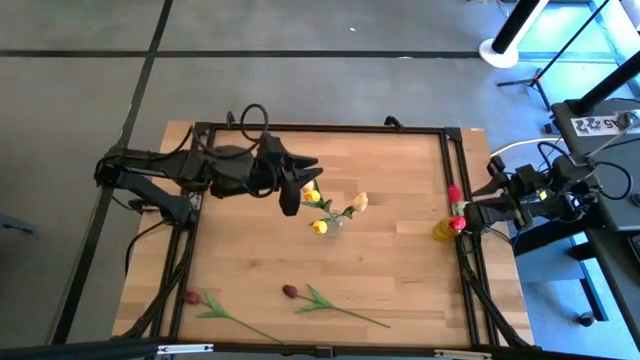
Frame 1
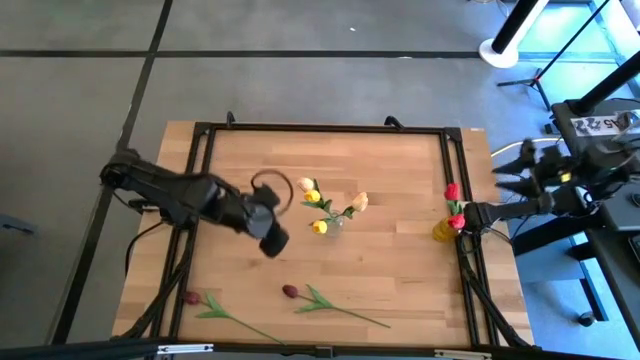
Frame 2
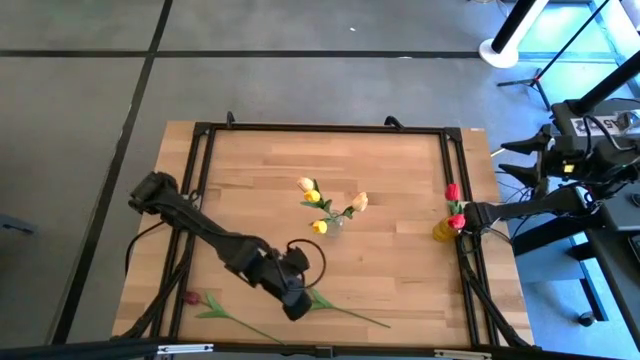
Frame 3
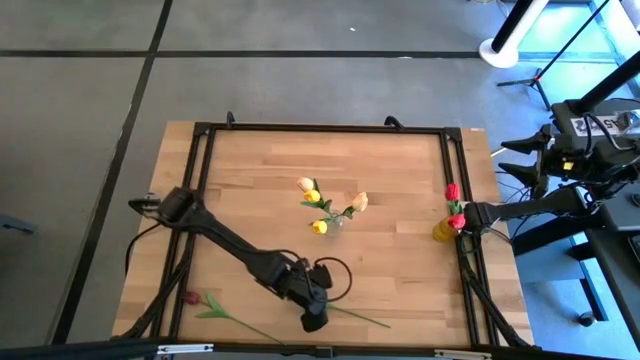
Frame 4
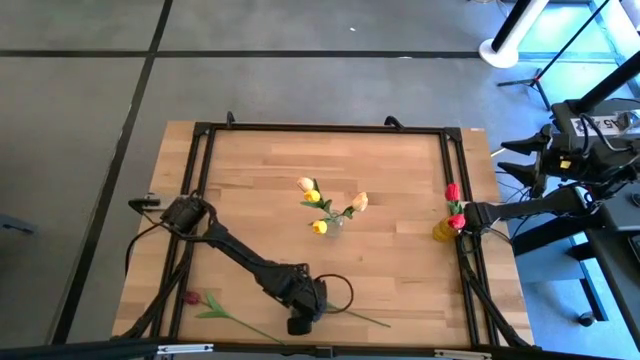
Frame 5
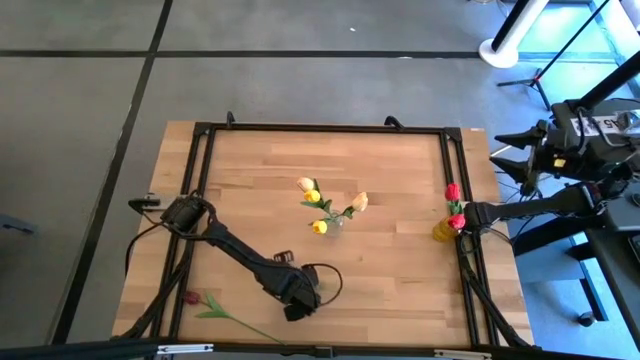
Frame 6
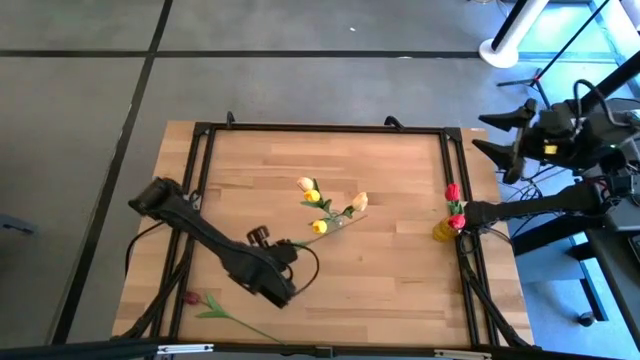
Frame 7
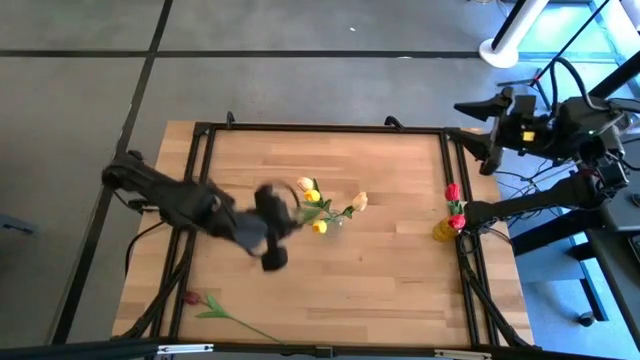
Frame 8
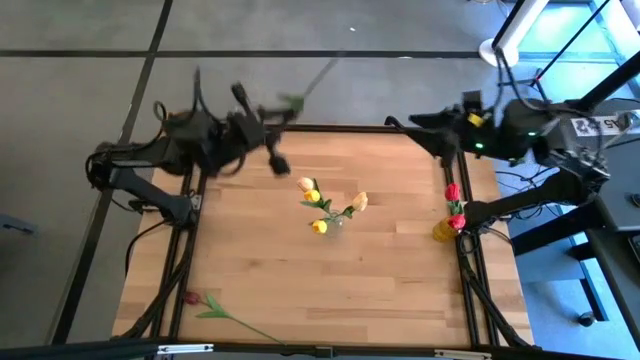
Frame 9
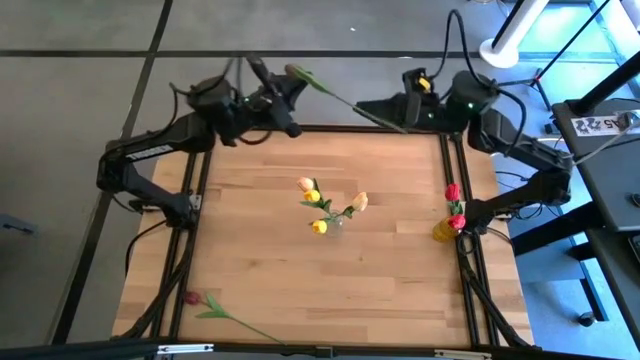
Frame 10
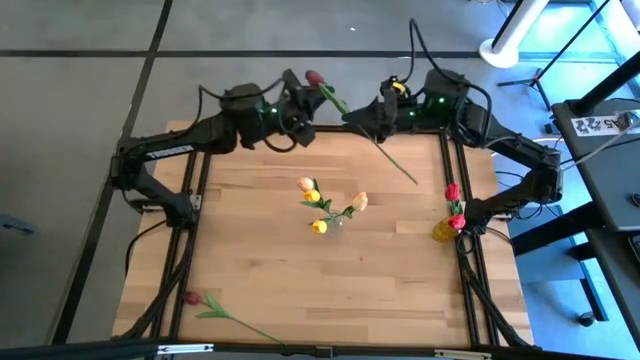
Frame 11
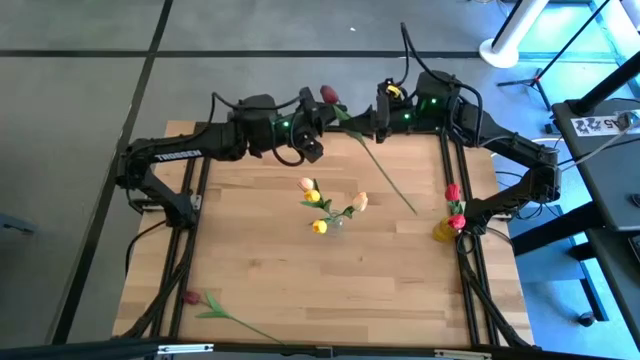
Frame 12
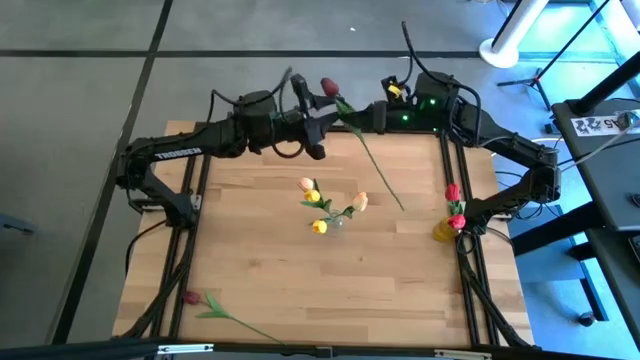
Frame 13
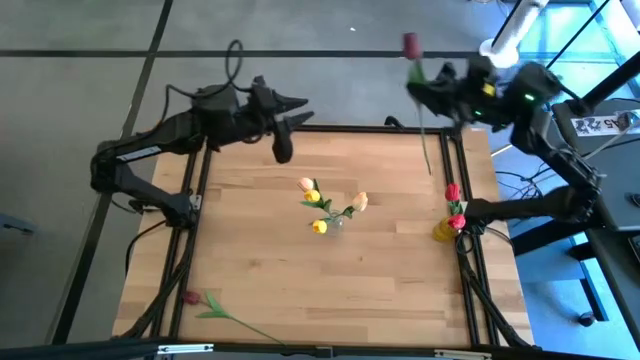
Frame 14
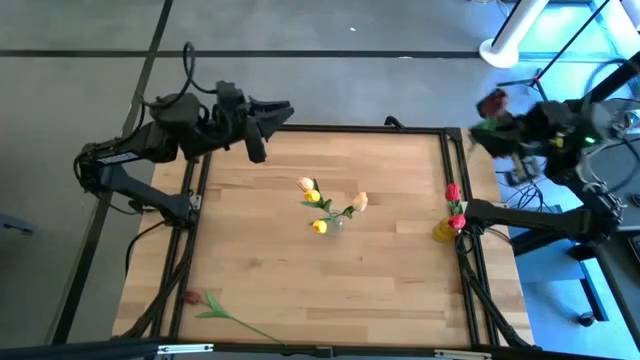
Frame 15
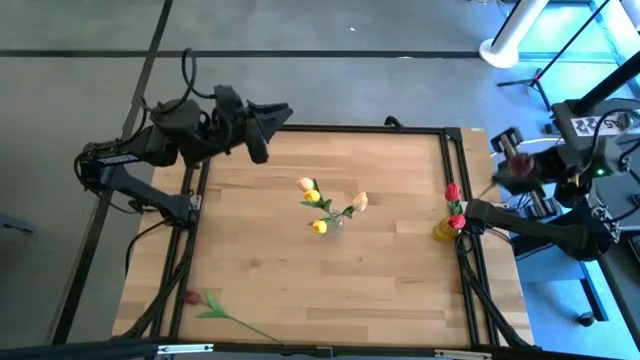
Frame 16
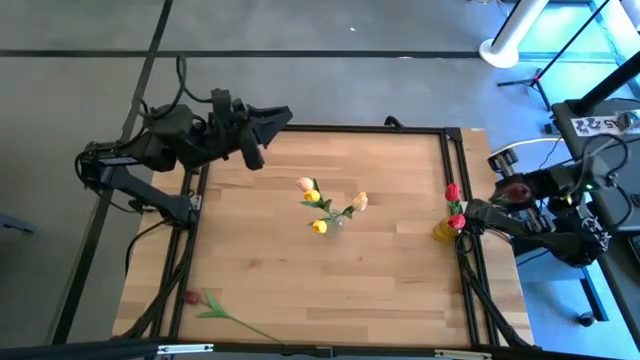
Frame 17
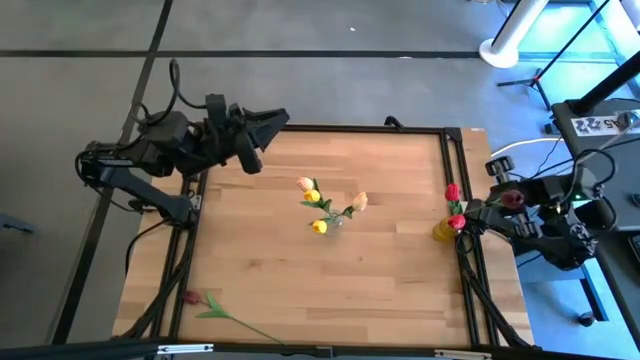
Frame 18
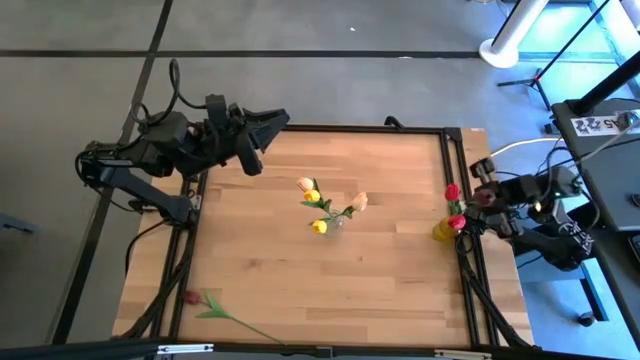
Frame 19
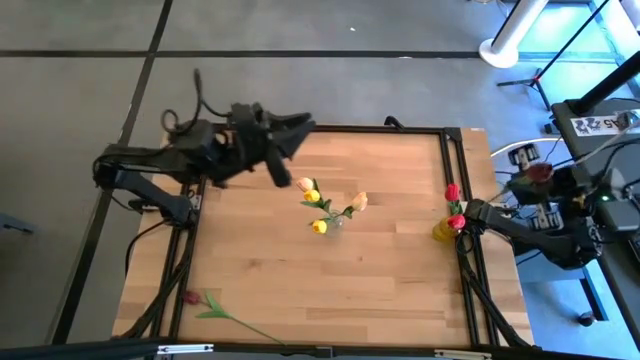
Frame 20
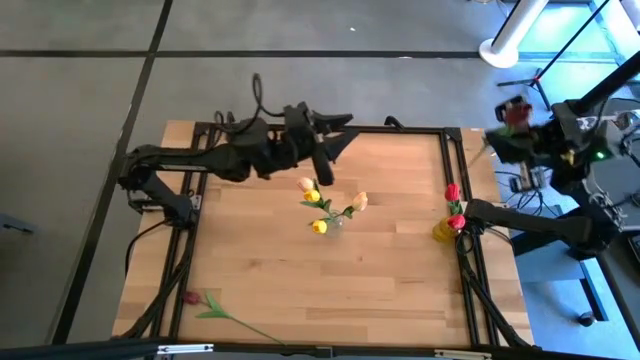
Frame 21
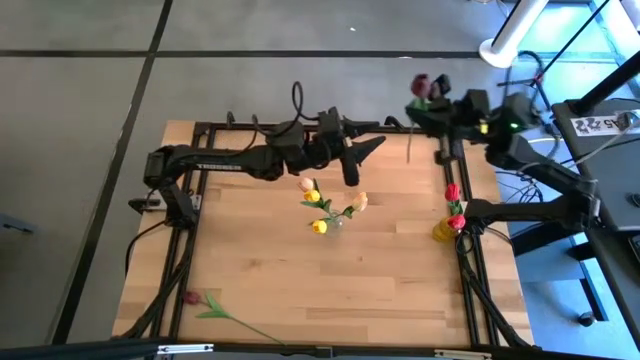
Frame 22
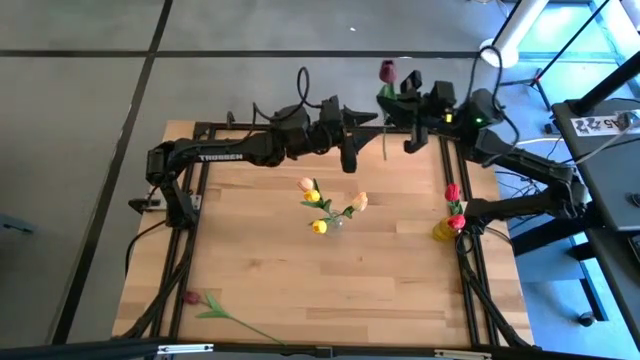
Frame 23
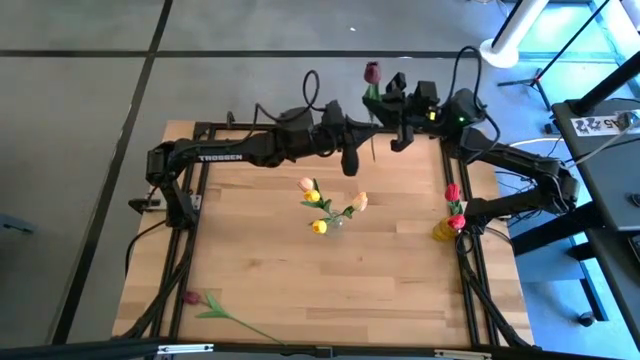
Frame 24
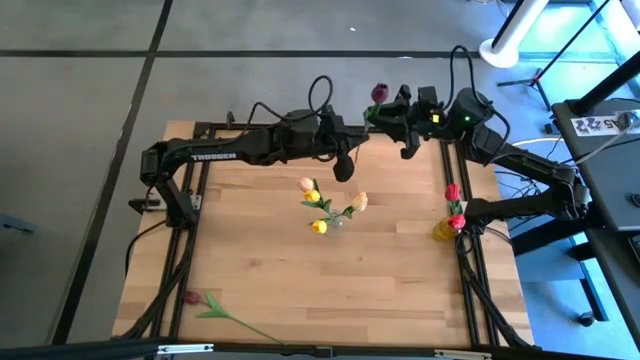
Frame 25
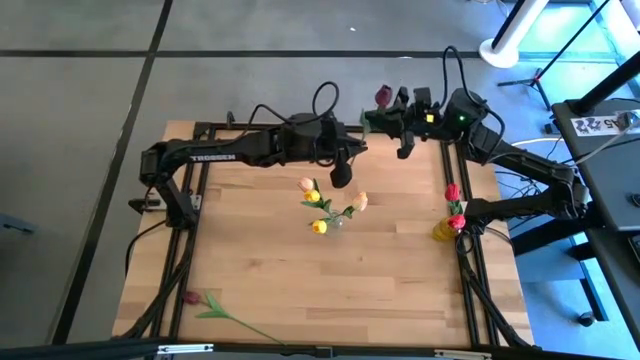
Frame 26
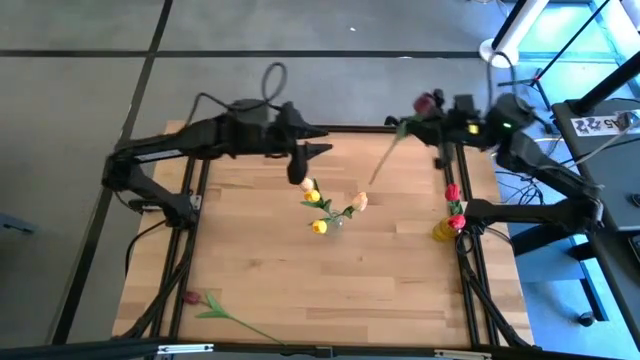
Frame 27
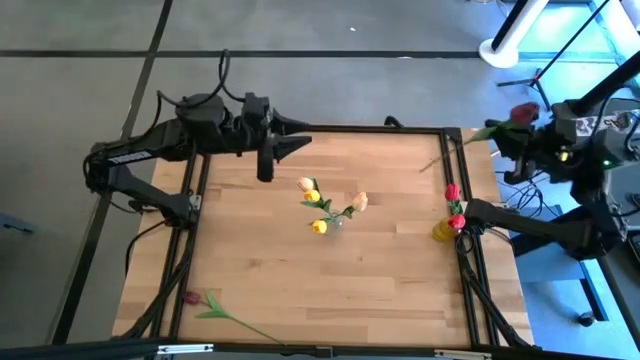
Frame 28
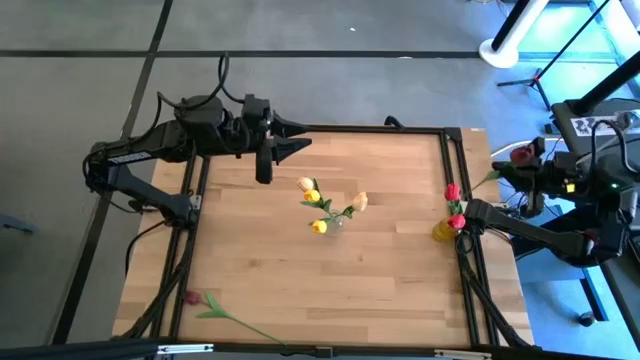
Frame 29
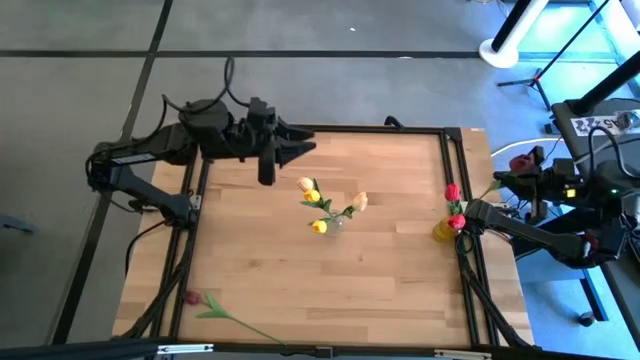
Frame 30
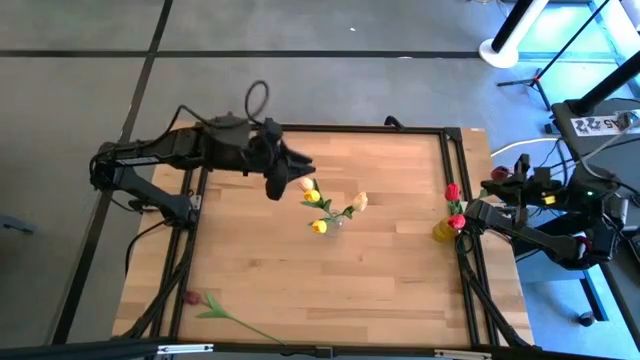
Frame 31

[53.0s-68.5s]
Task: Sort flowers into vase by color
Put the right dark red tulip into the yellow vase

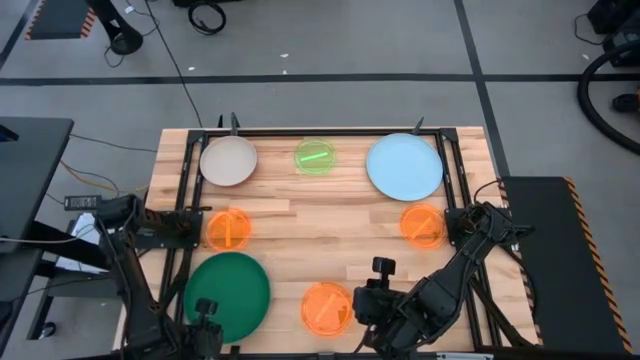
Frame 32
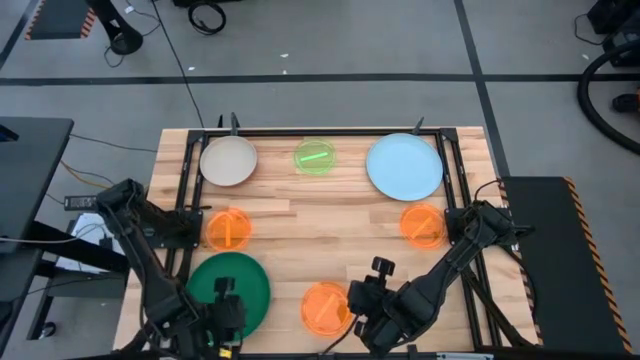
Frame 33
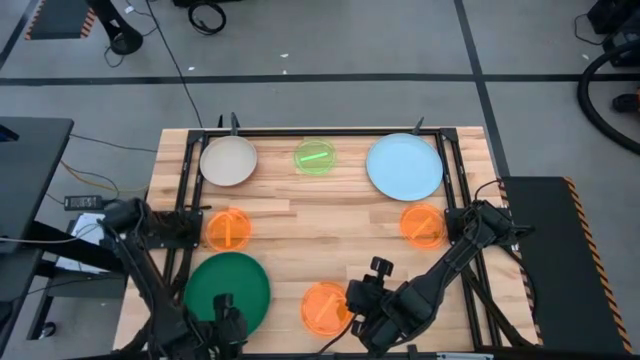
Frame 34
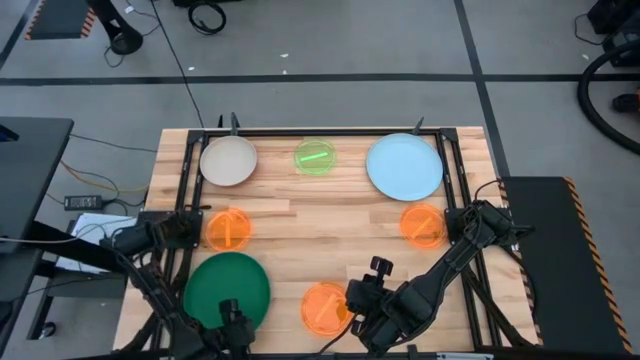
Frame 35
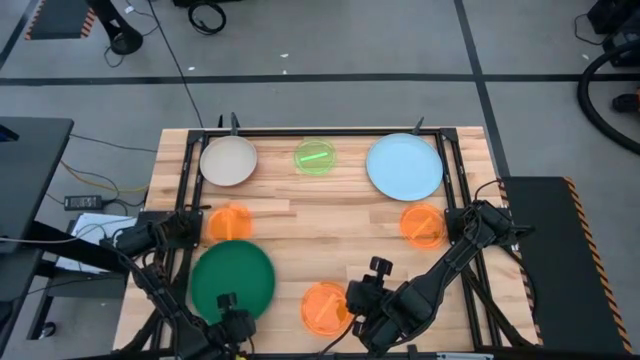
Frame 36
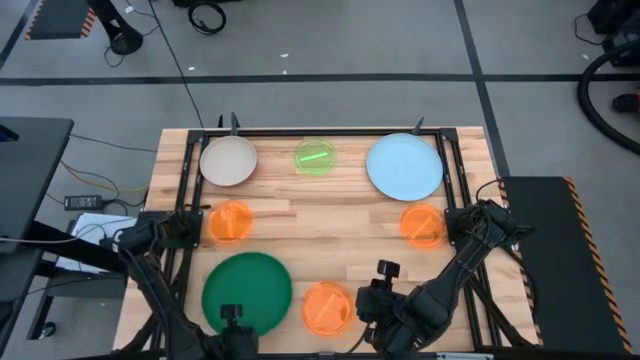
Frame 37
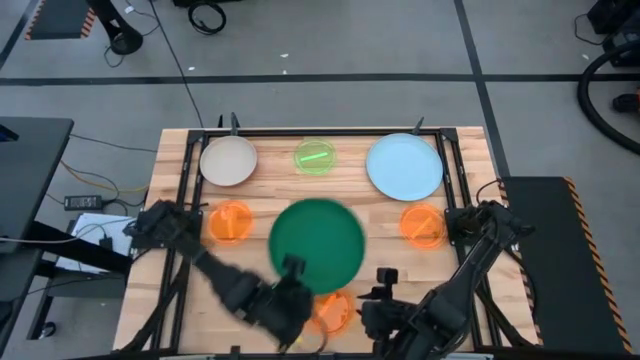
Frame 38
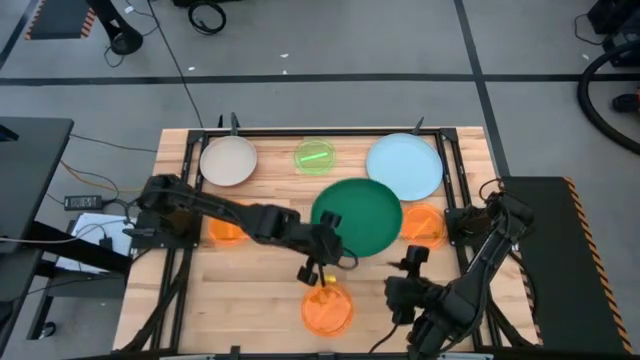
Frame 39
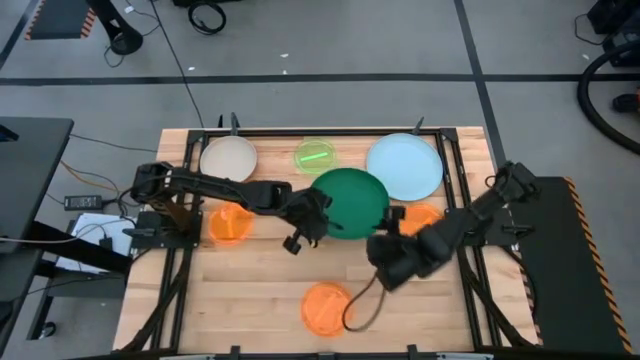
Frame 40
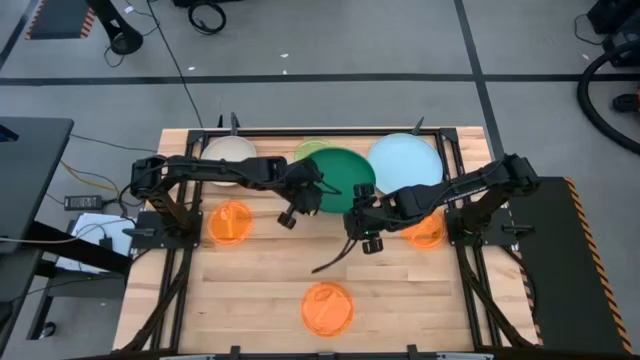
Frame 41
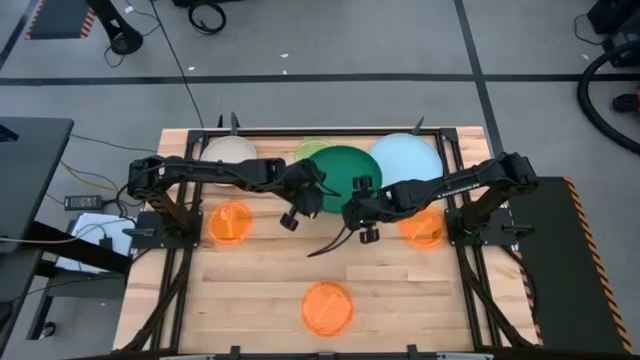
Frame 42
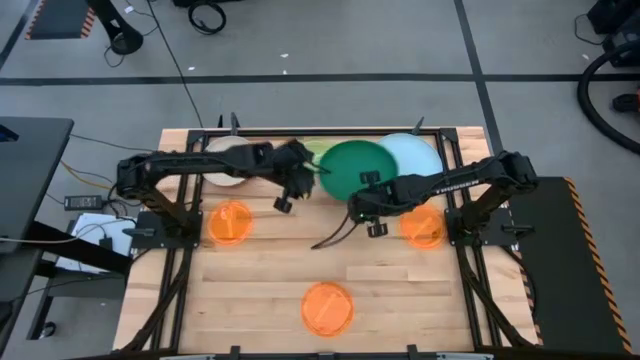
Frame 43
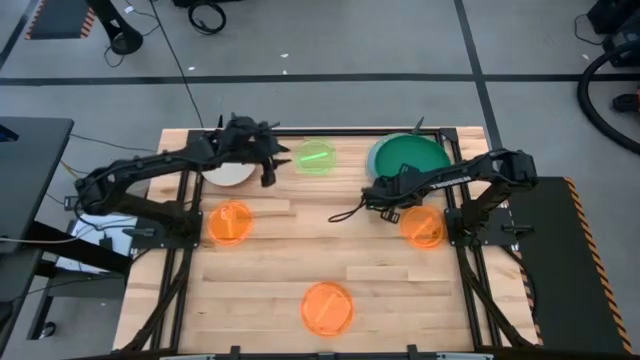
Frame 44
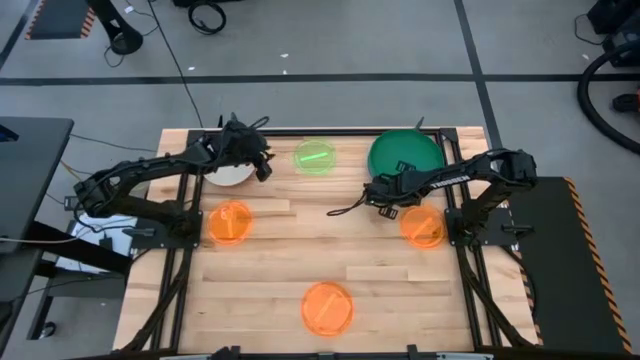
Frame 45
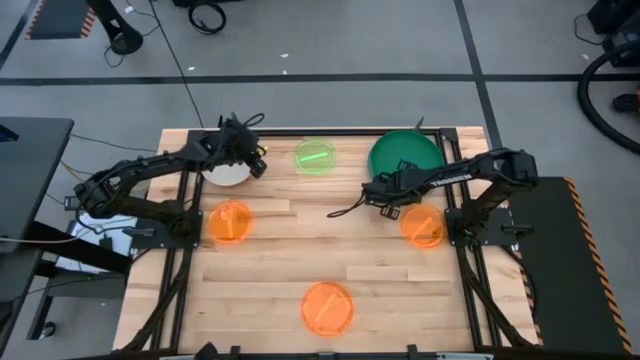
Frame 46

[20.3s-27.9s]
Task: Stack plastic plates
Stack the bottom stacked plates on top of the light blue plate
